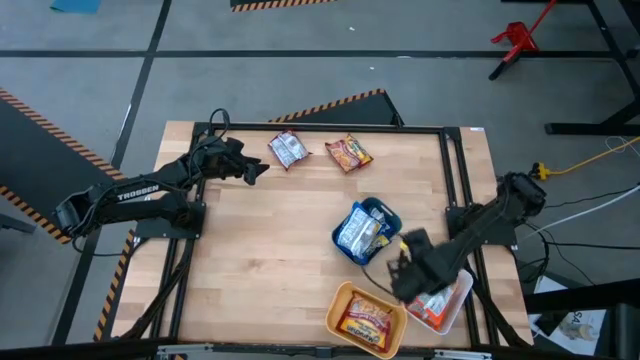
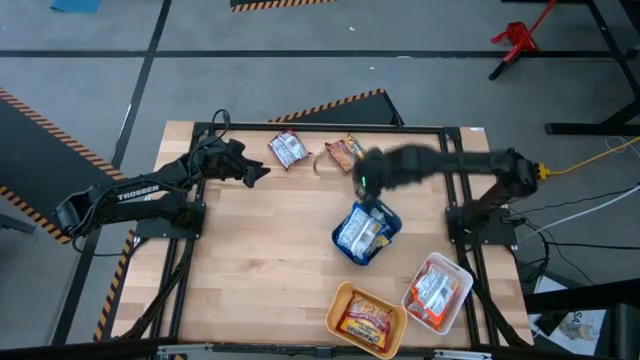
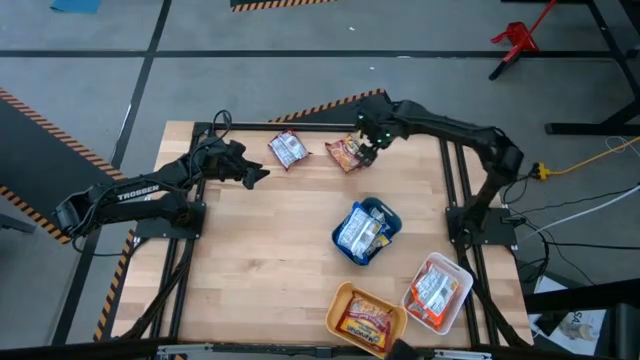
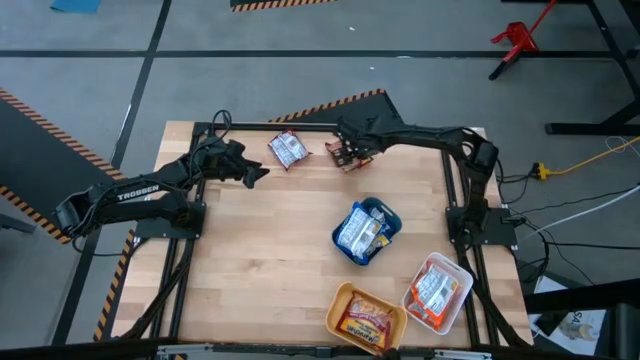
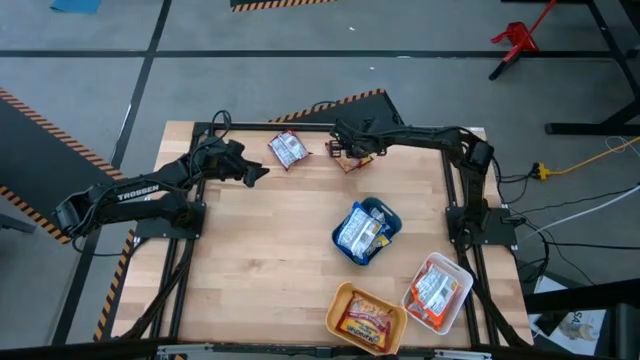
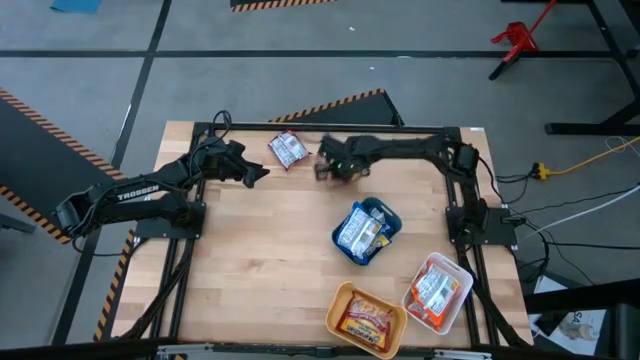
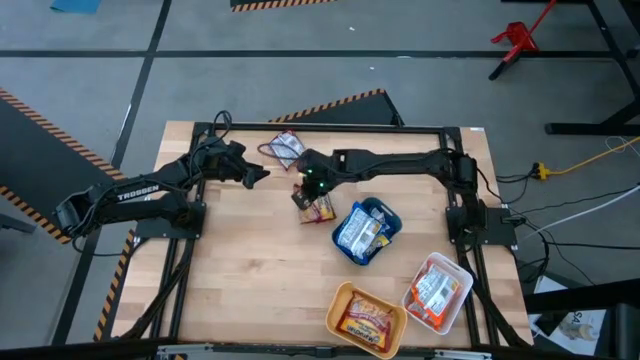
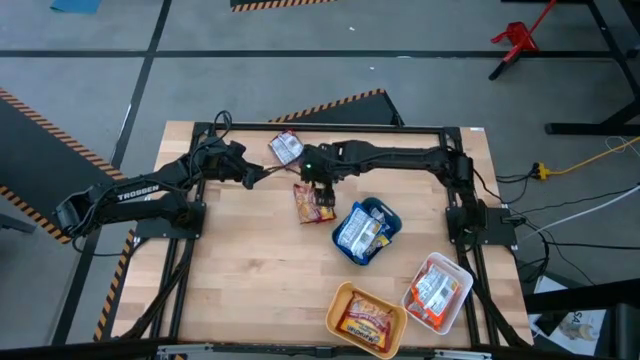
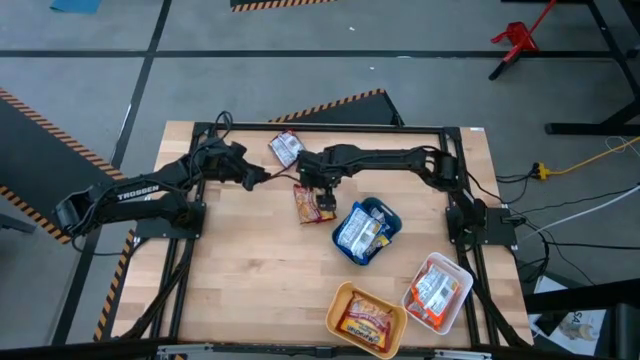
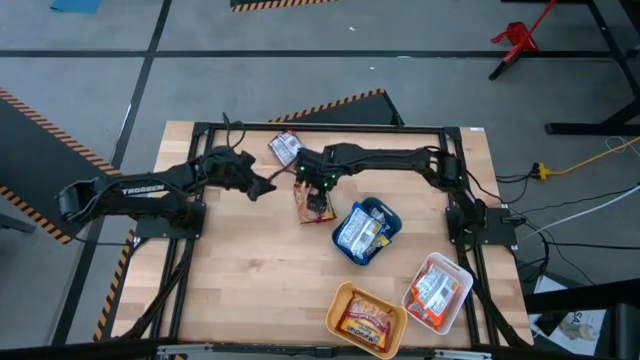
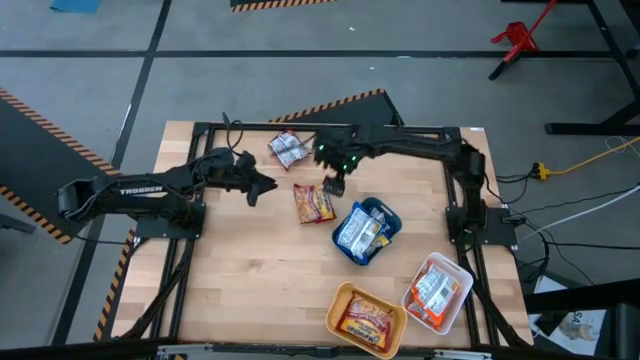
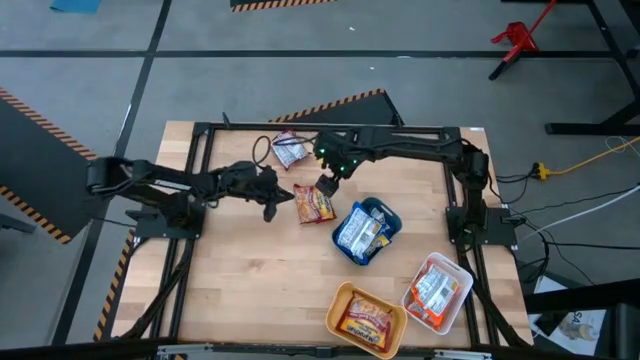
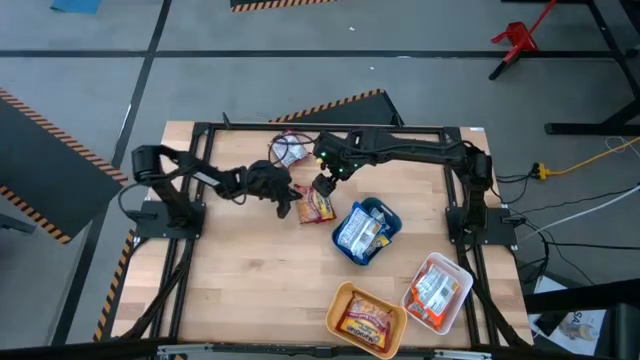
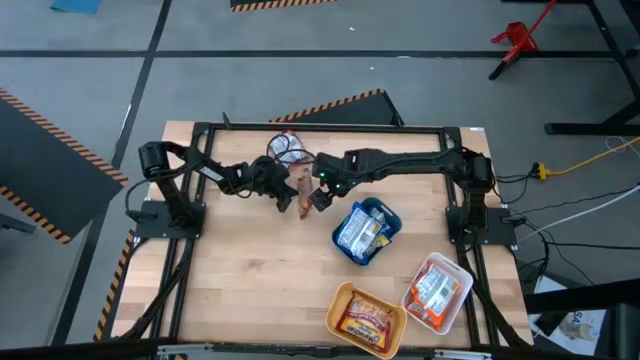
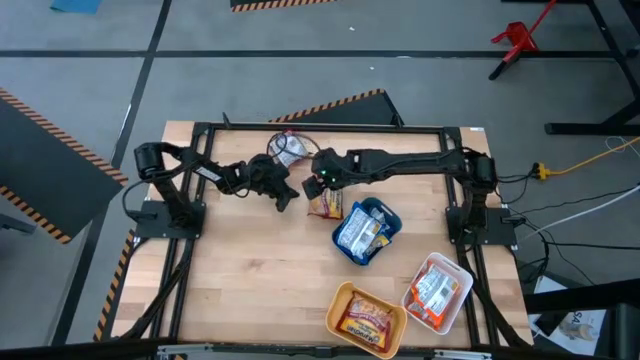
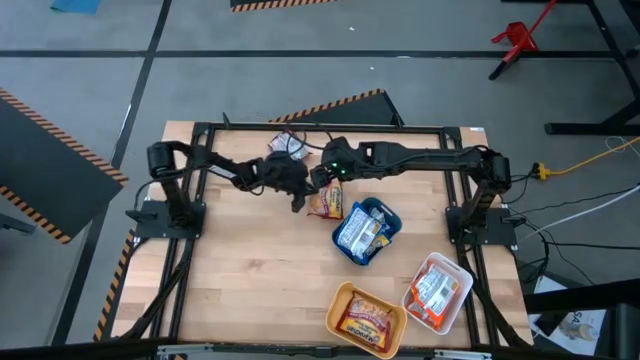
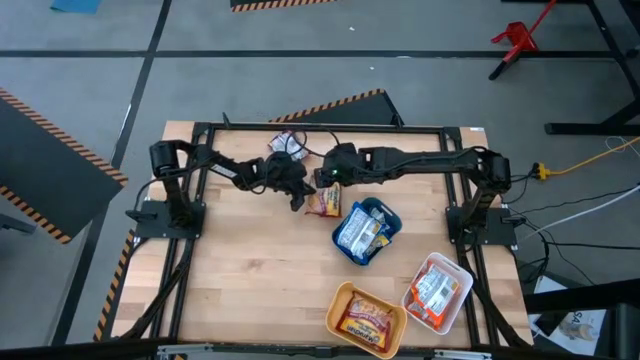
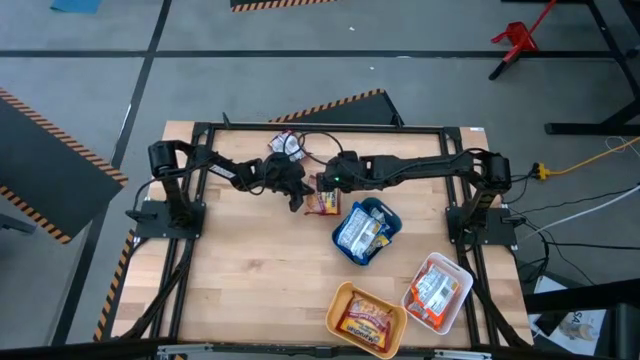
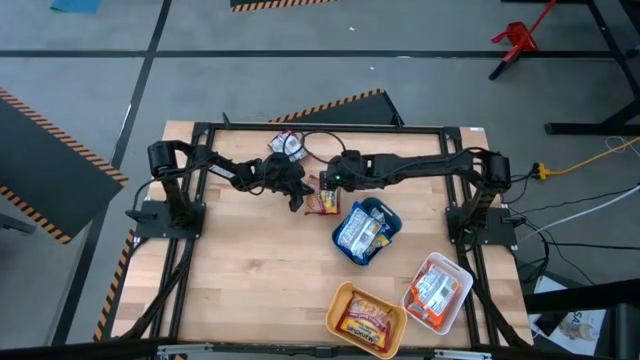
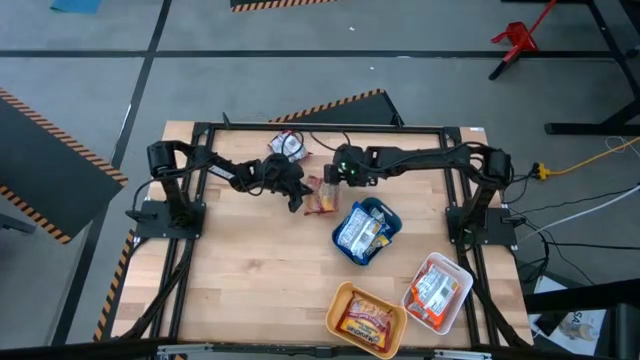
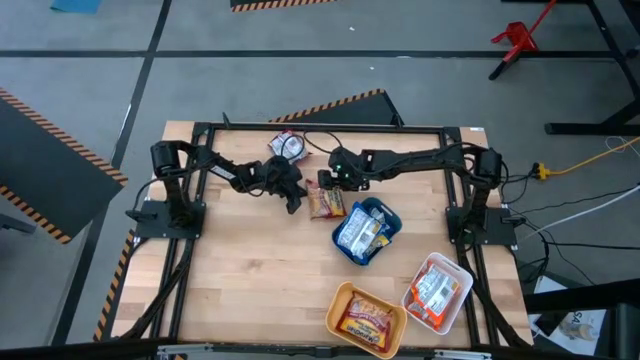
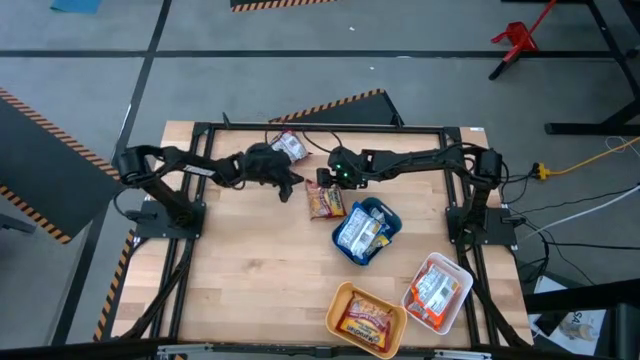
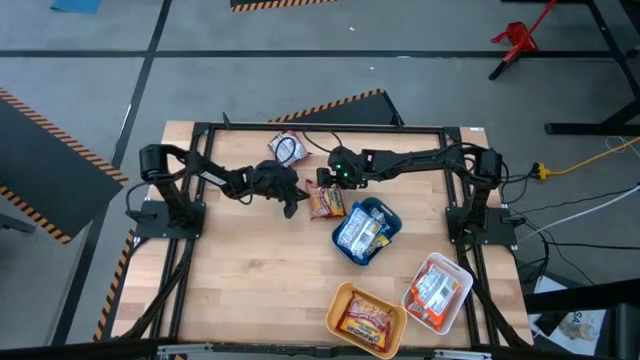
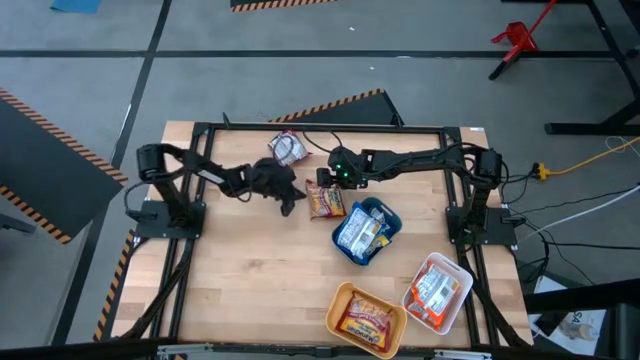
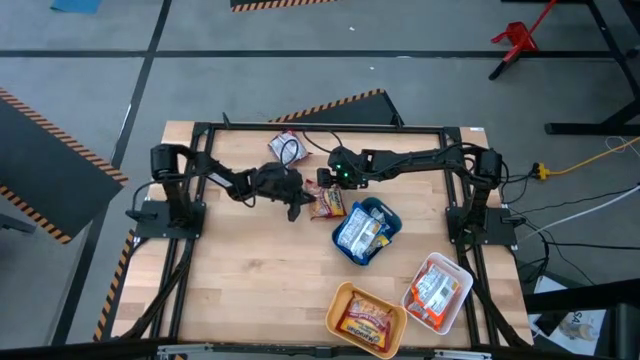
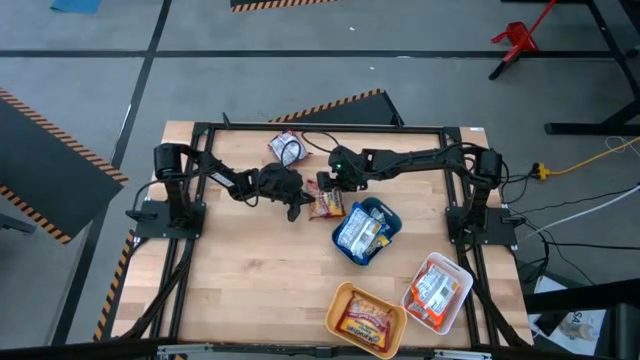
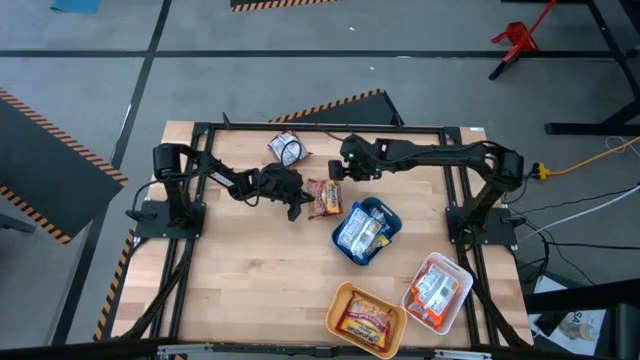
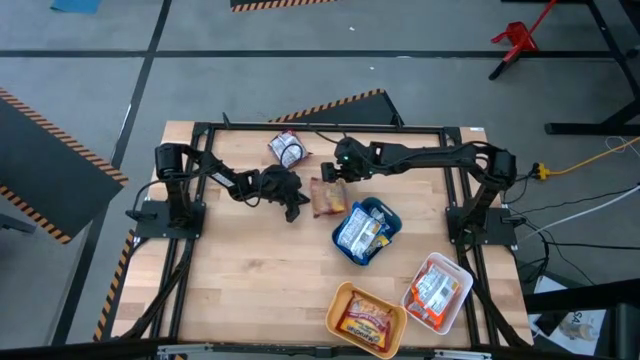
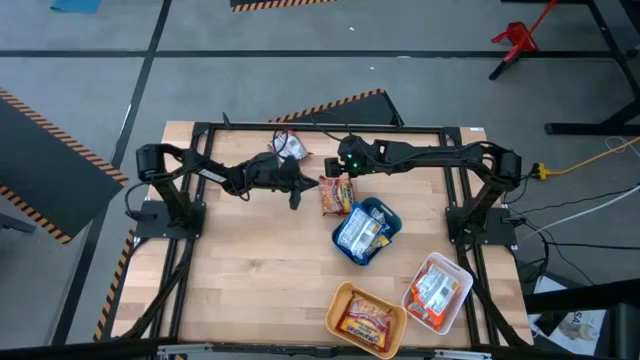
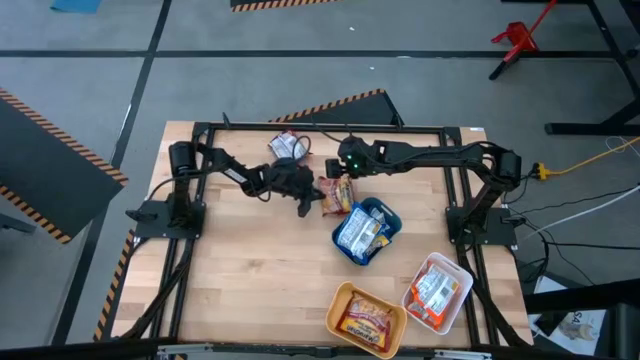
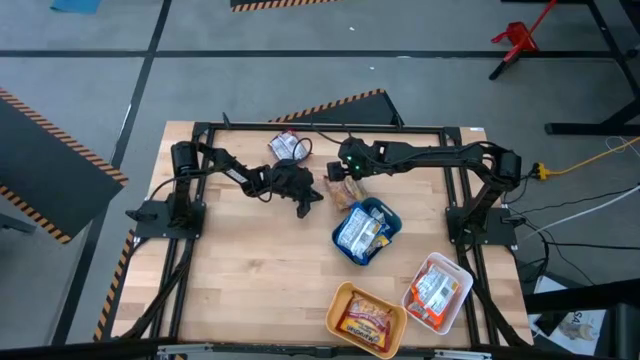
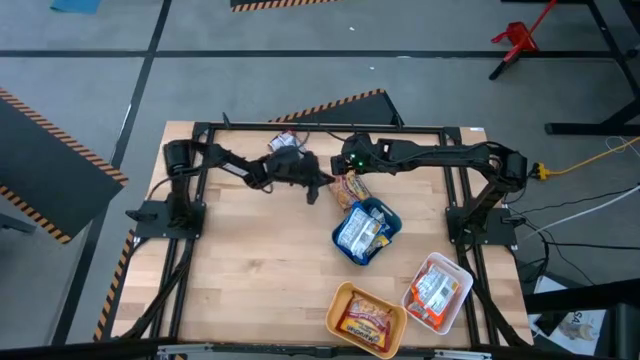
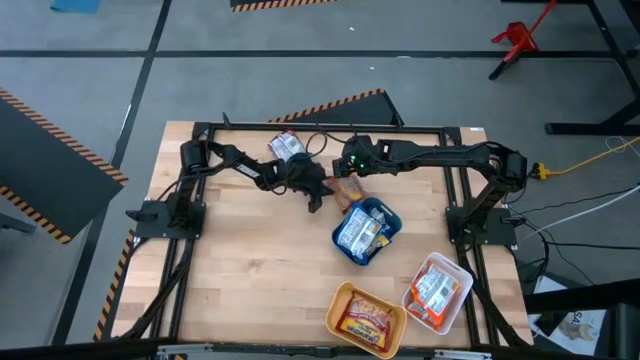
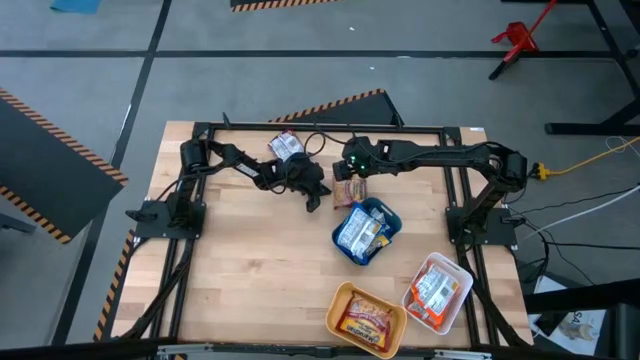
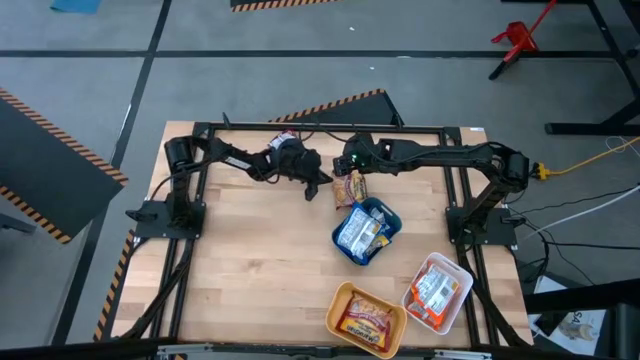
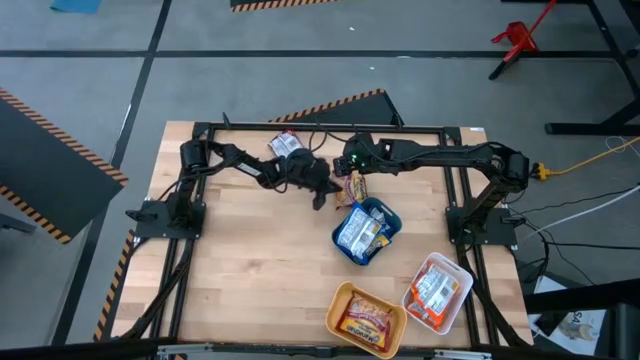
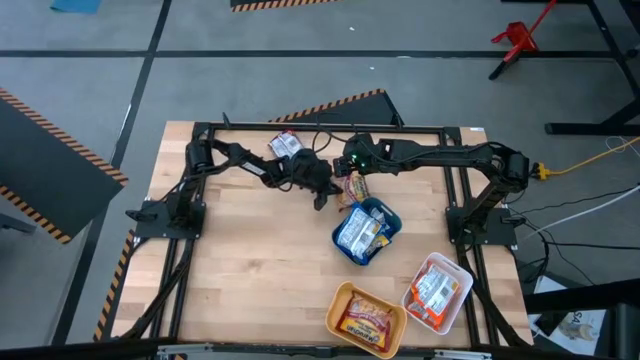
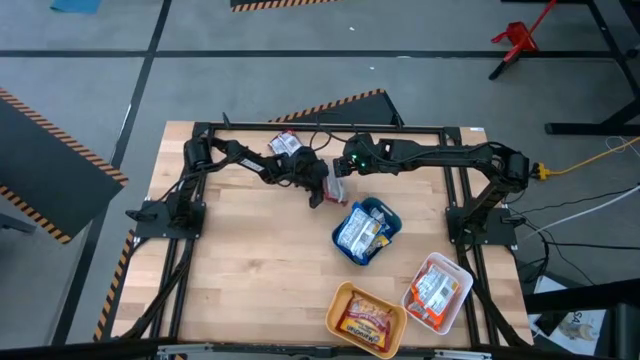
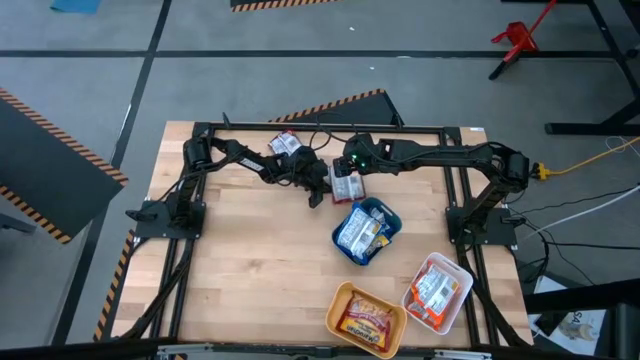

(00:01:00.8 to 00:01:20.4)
Task: Sort Maruchan noodles
Put the right red noodle pack into the yellow bin
